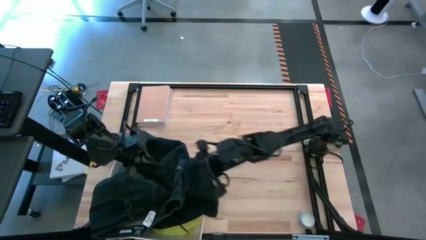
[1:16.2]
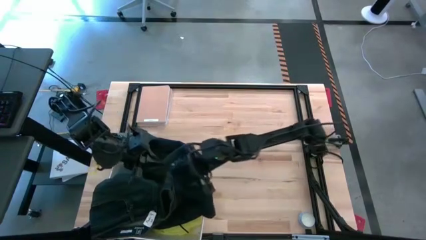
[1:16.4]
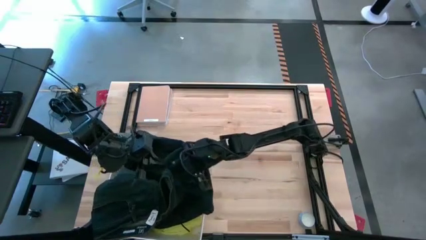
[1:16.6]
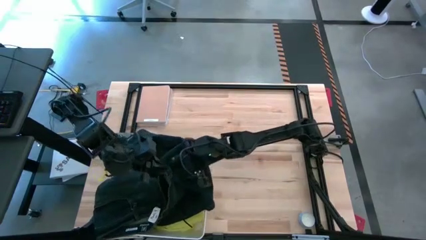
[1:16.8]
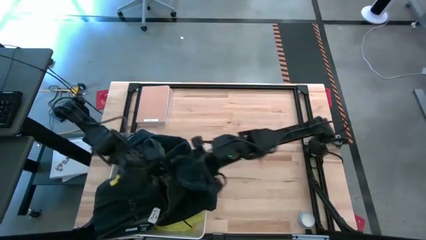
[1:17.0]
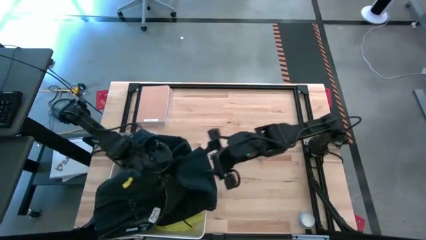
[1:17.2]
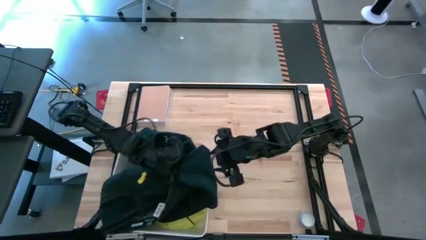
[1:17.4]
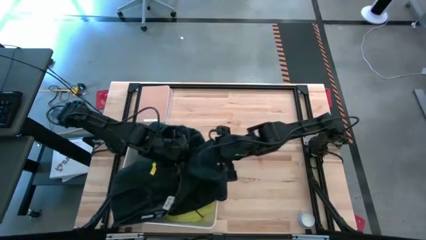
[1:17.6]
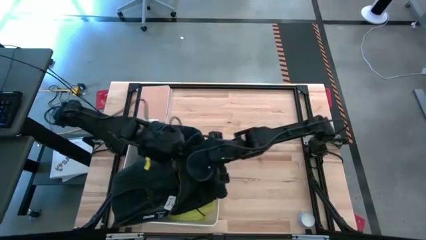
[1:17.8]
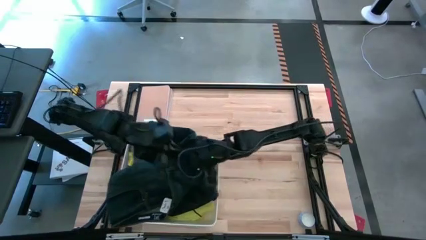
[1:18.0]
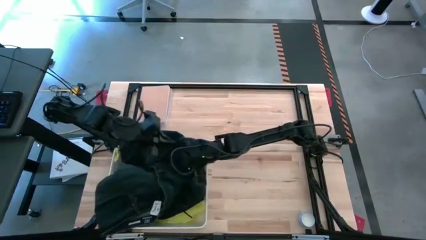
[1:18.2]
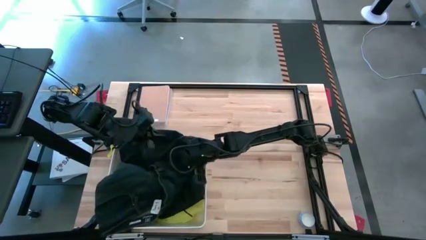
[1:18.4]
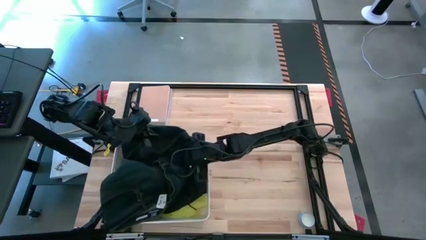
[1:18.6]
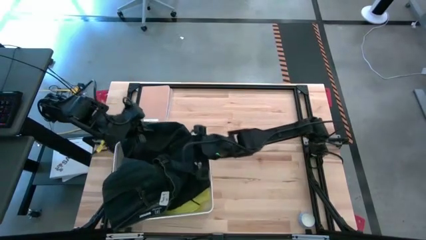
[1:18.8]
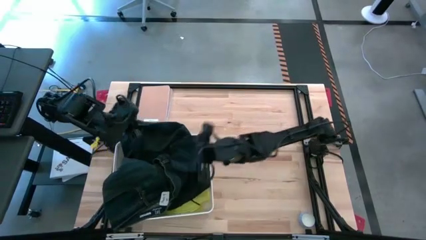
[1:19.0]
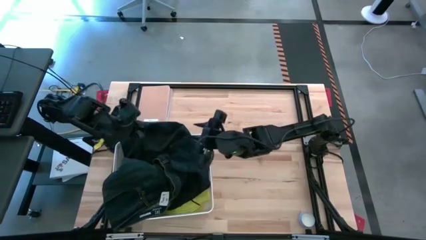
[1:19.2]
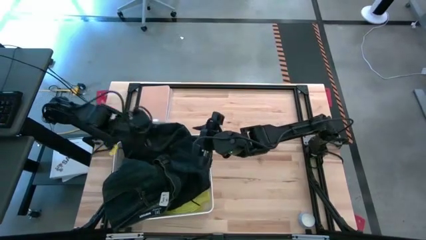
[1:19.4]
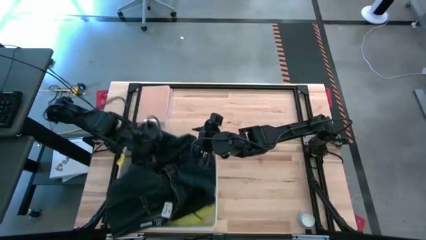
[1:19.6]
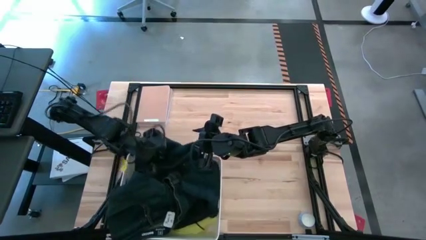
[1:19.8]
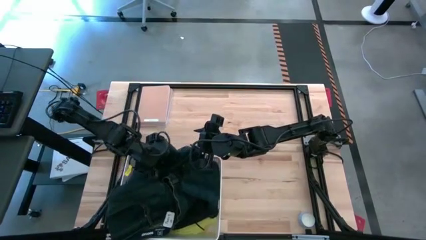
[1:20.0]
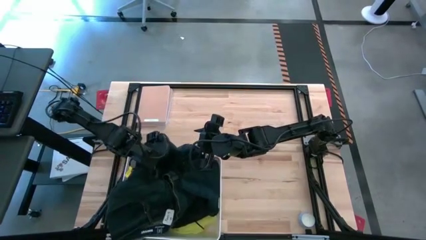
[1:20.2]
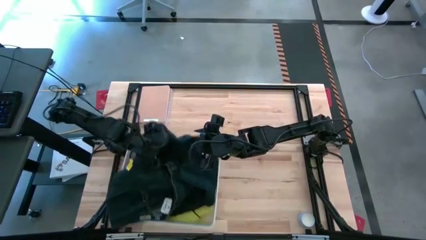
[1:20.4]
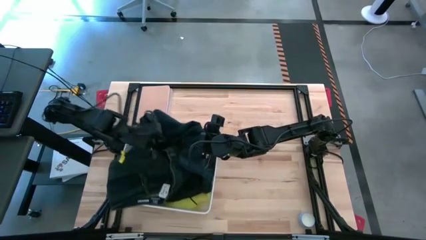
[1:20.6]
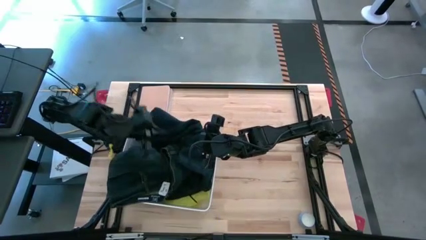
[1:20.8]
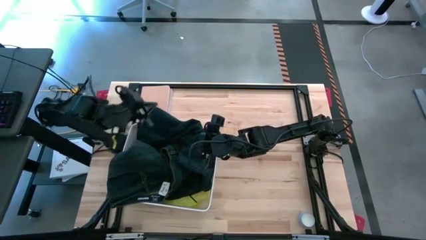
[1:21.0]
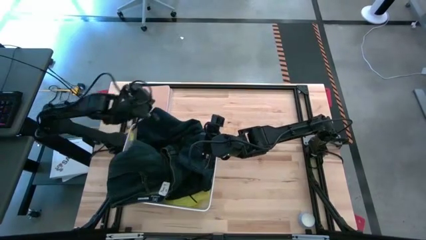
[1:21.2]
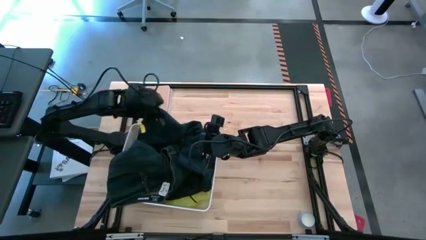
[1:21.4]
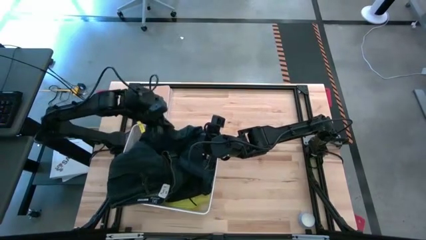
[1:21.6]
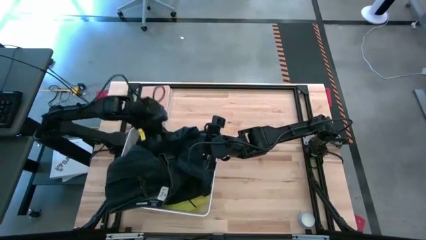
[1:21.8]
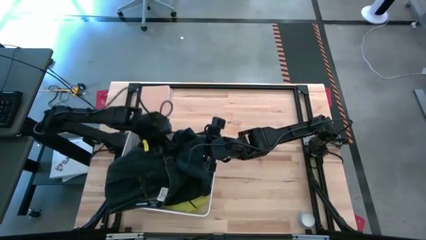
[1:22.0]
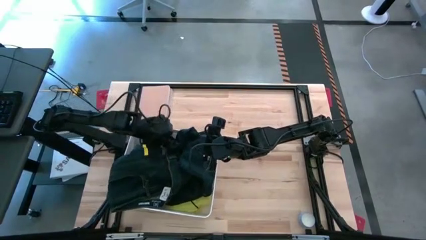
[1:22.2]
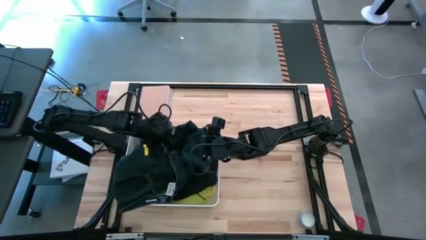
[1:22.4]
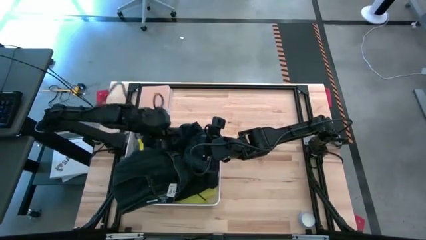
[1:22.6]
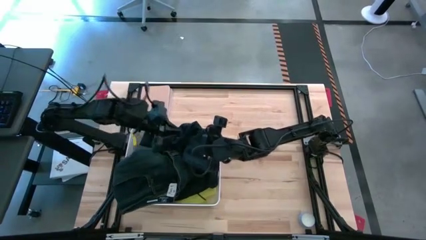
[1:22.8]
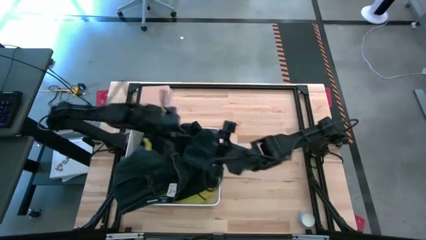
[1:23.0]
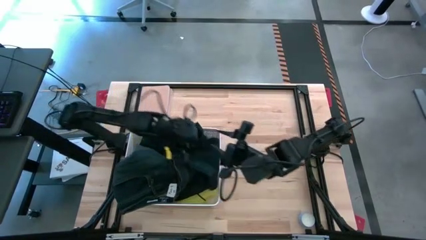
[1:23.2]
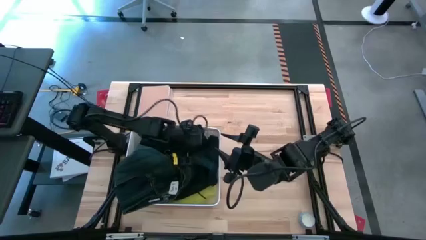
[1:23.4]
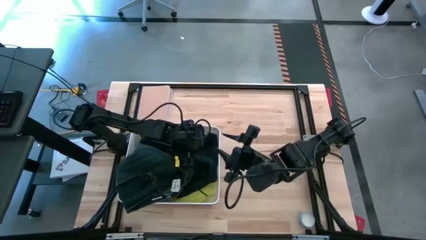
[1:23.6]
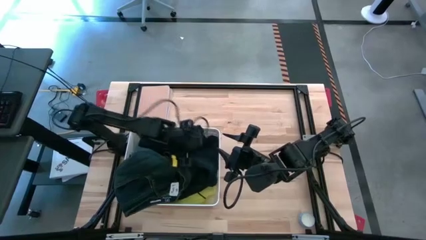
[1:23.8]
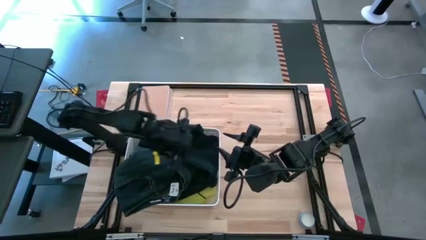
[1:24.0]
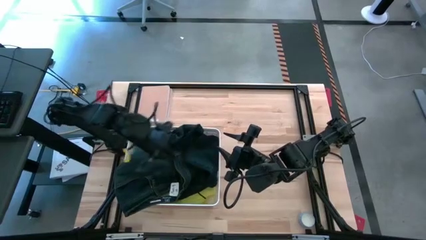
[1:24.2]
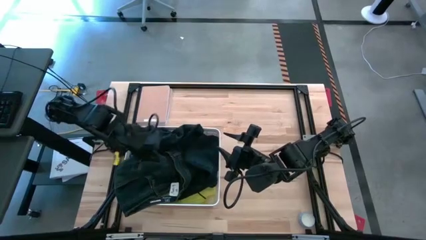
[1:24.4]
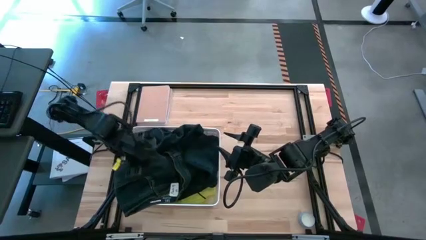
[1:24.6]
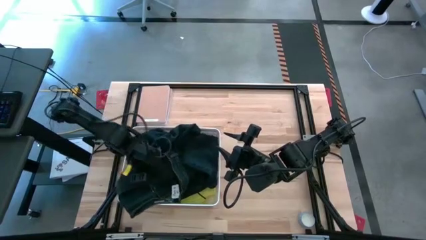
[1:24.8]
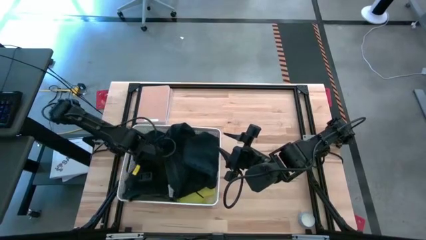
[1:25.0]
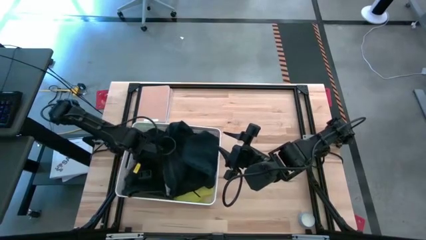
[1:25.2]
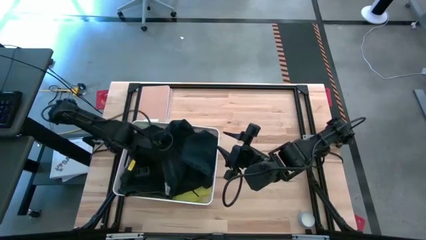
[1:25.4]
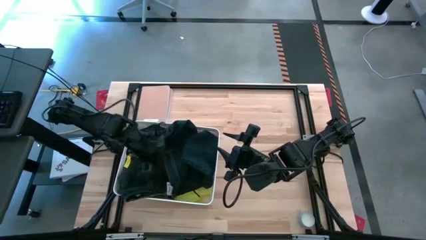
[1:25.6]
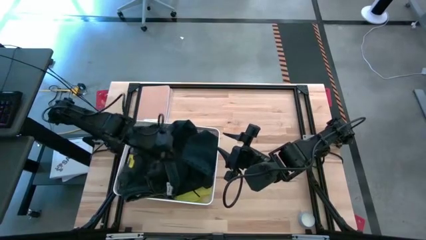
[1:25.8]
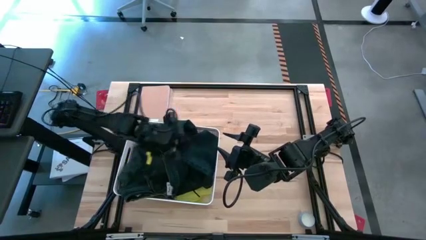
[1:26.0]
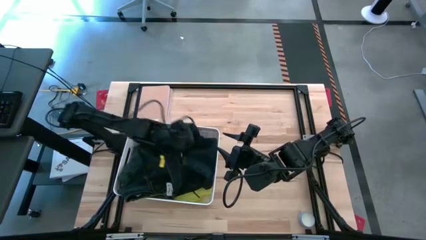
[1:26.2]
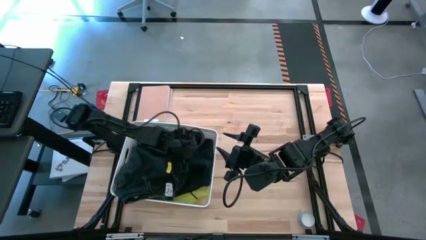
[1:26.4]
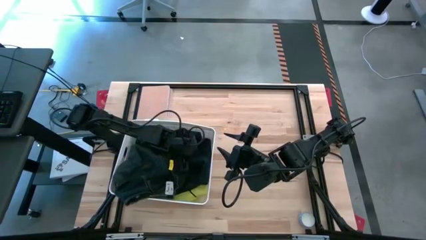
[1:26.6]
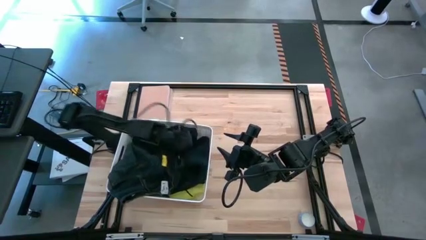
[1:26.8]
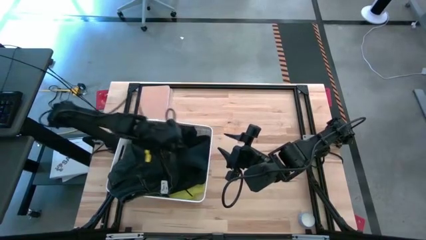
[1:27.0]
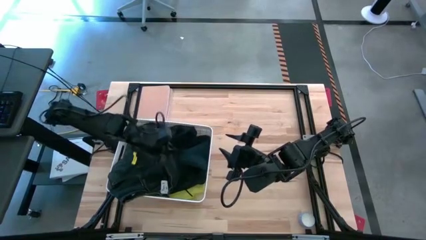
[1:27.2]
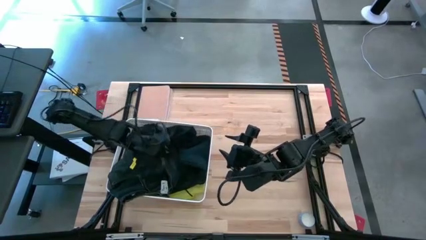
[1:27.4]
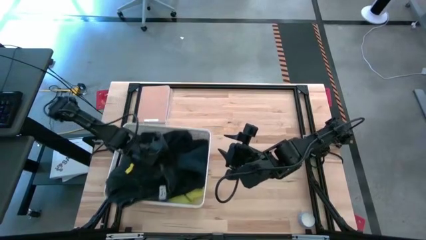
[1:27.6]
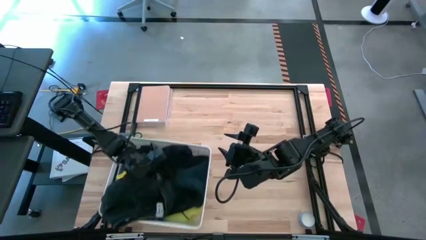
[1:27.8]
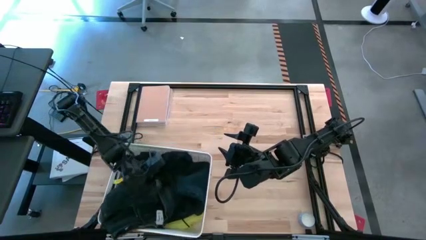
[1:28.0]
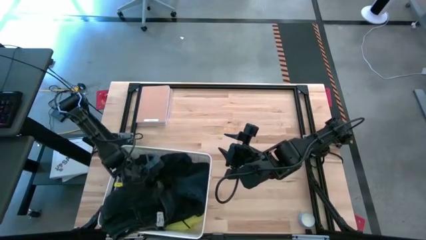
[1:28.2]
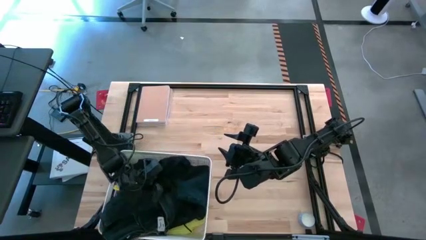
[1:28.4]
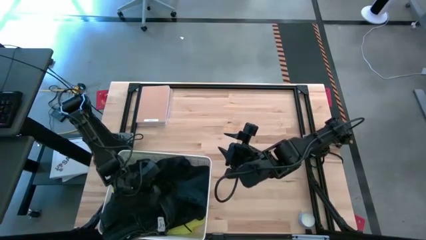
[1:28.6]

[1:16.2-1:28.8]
Task: Sort clothes
Put the dark blue pants into the white bin

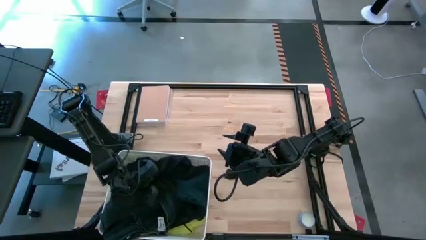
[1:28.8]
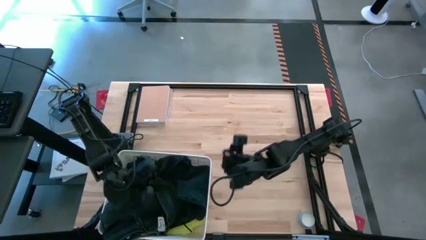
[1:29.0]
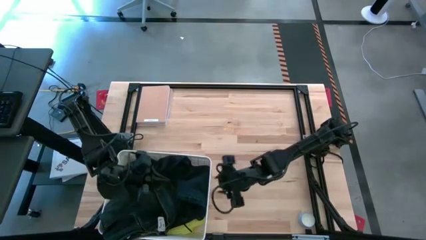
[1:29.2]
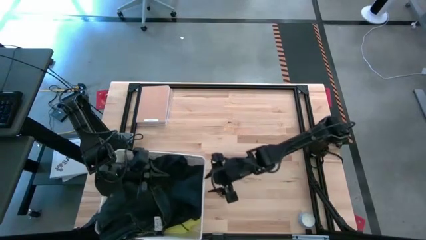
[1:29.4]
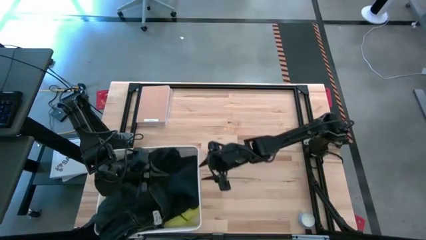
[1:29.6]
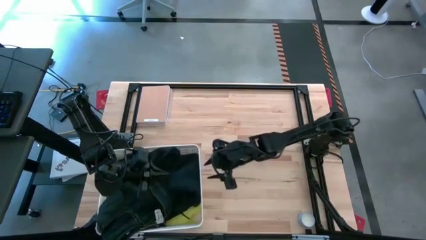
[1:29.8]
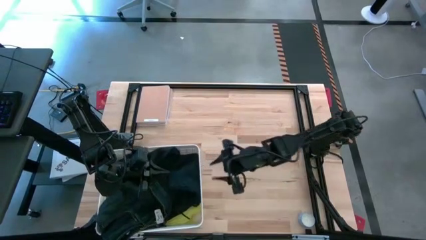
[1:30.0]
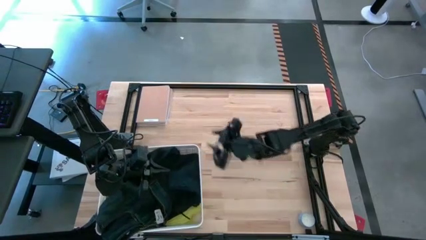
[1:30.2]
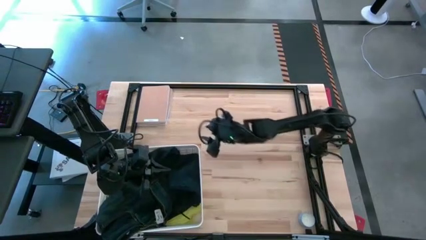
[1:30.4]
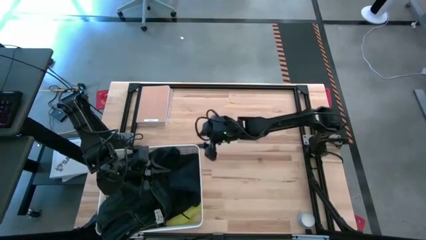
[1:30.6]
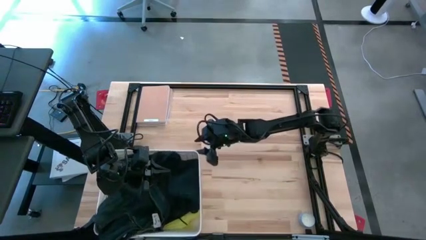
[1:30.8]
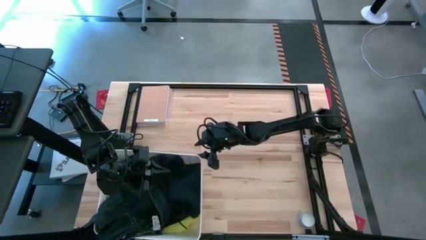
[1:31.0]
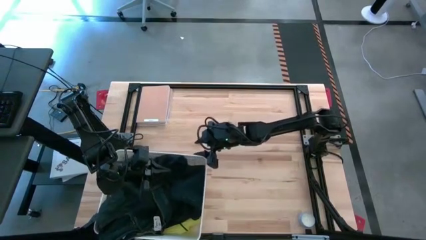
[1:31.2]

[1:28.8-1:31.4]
Adjust the white bin
